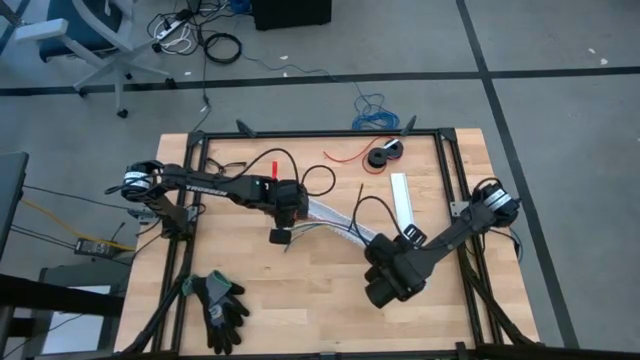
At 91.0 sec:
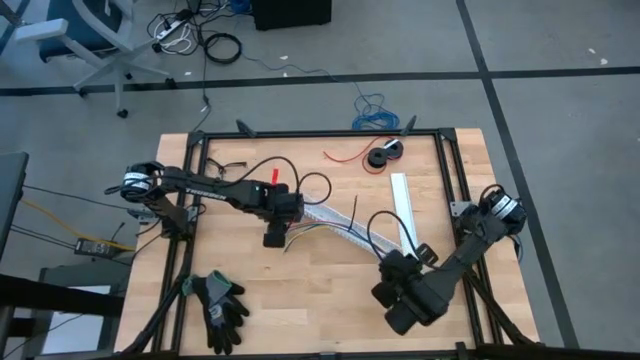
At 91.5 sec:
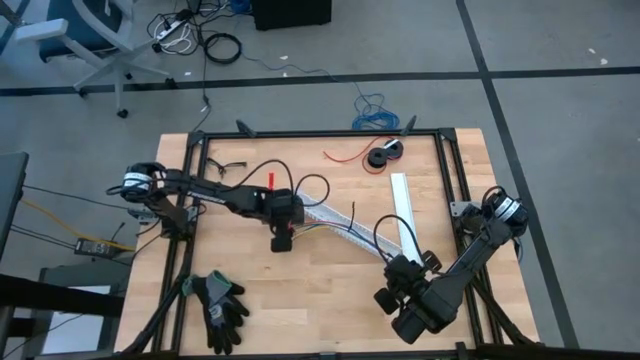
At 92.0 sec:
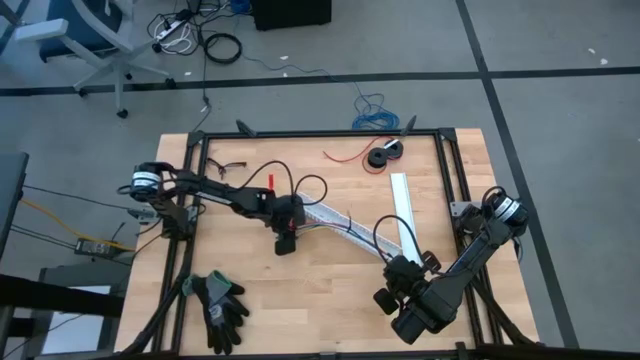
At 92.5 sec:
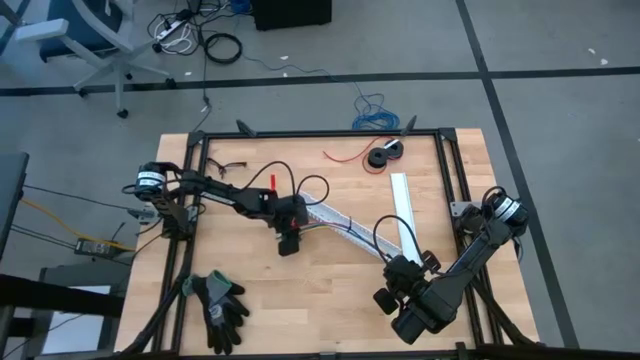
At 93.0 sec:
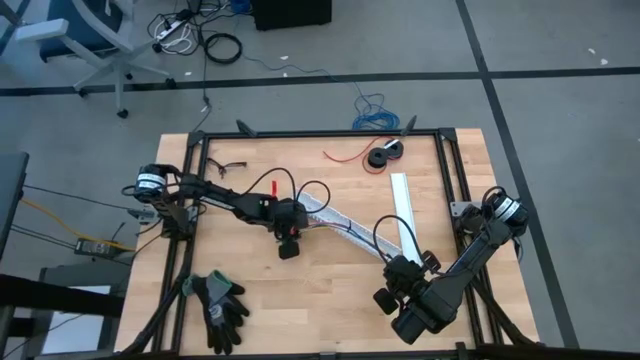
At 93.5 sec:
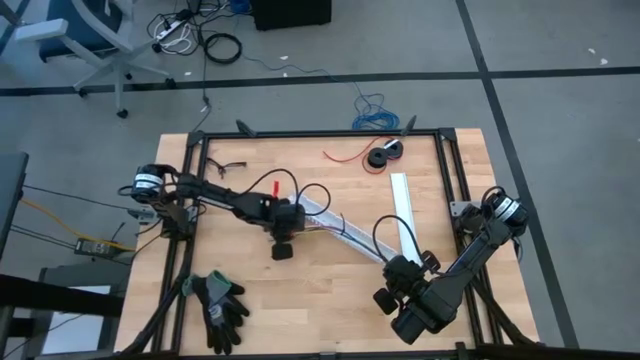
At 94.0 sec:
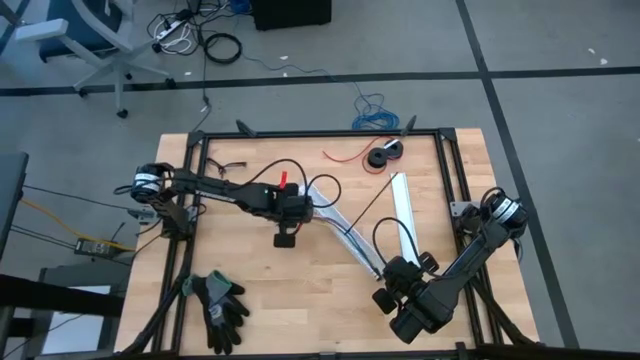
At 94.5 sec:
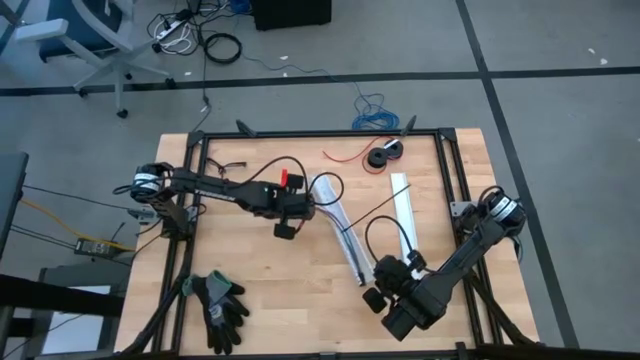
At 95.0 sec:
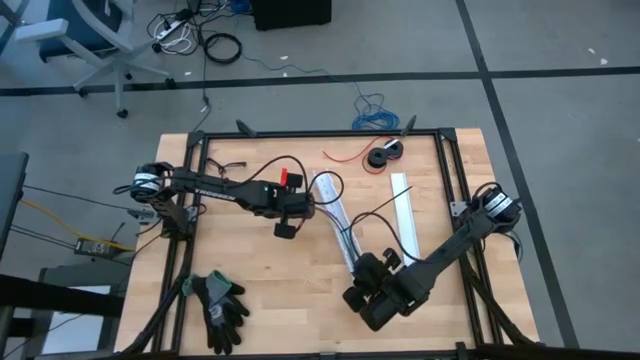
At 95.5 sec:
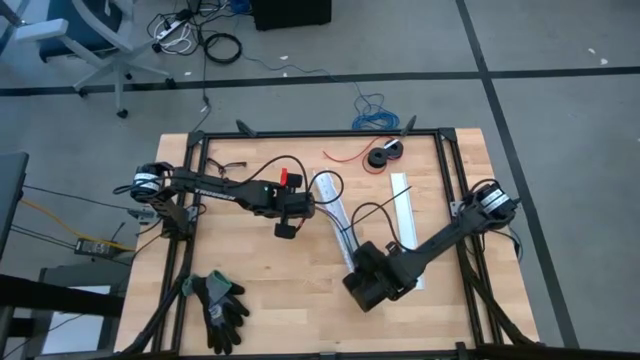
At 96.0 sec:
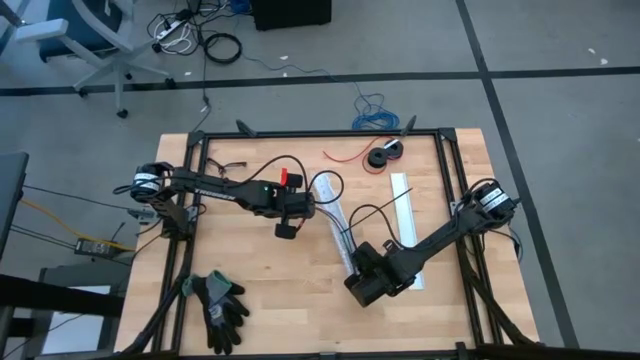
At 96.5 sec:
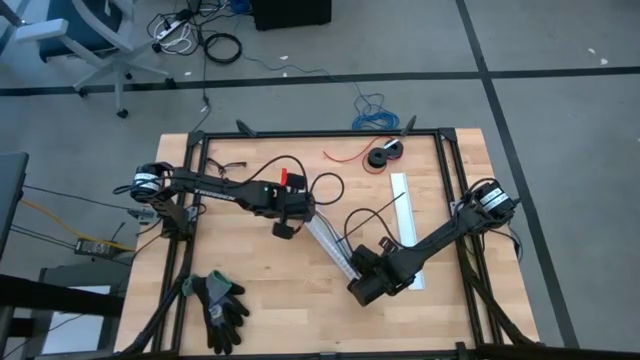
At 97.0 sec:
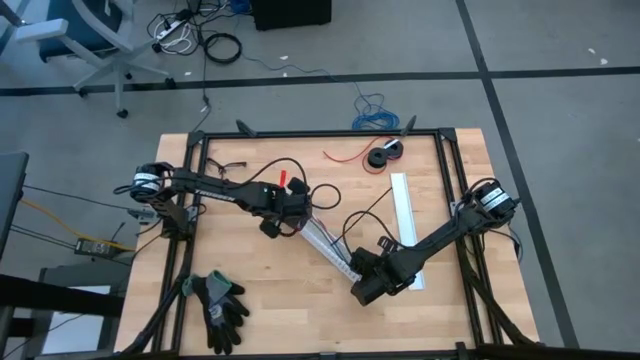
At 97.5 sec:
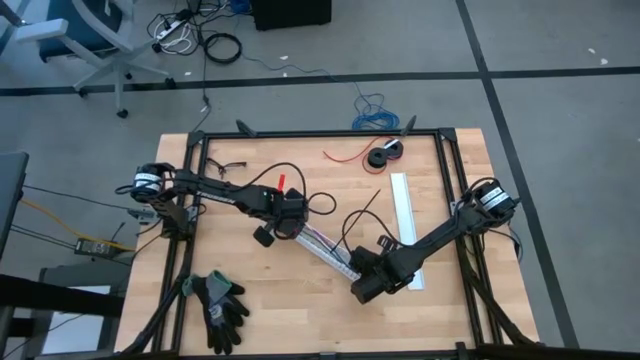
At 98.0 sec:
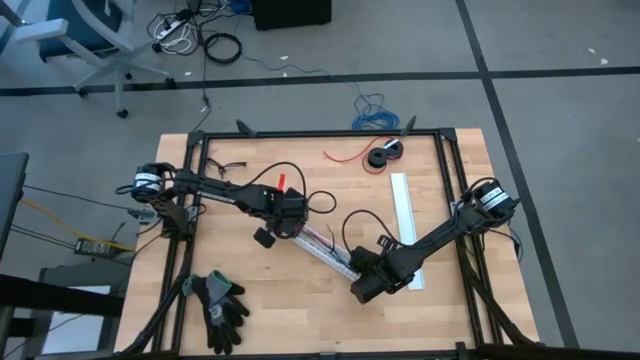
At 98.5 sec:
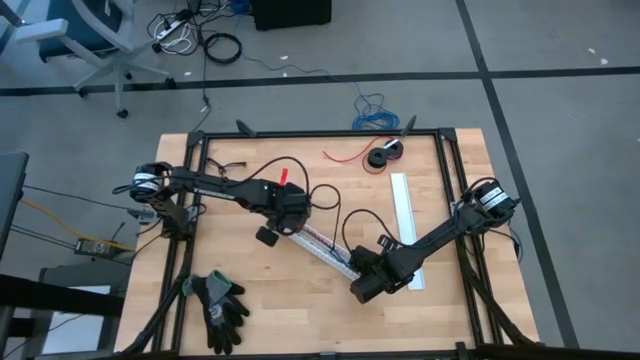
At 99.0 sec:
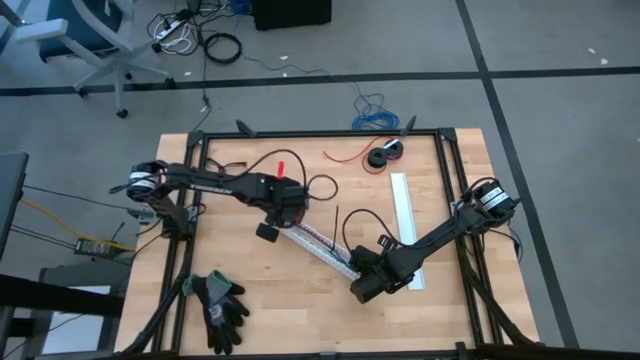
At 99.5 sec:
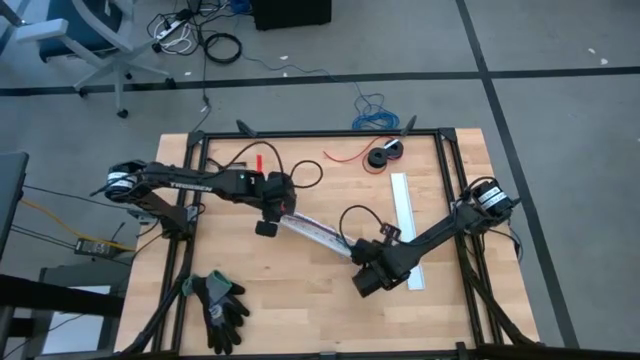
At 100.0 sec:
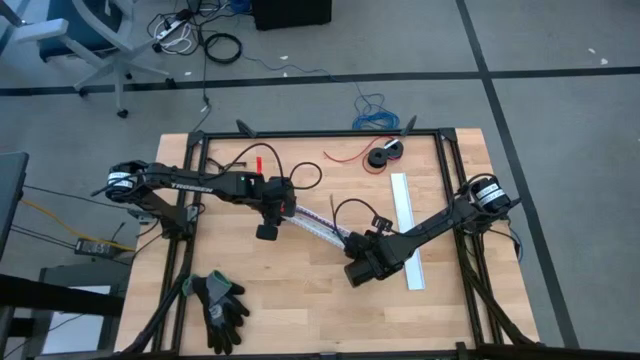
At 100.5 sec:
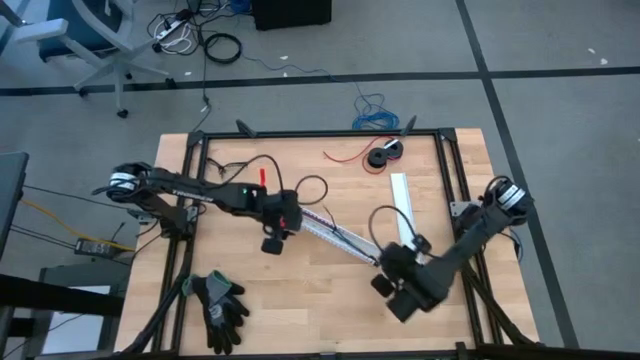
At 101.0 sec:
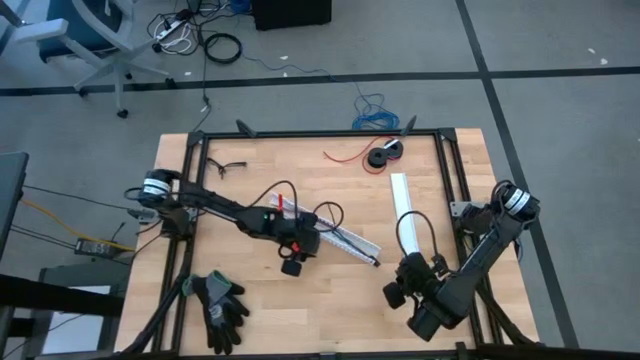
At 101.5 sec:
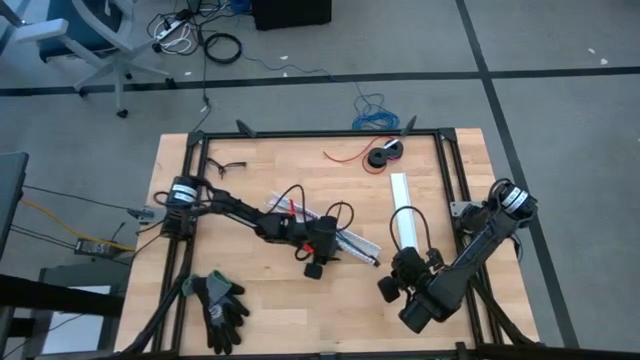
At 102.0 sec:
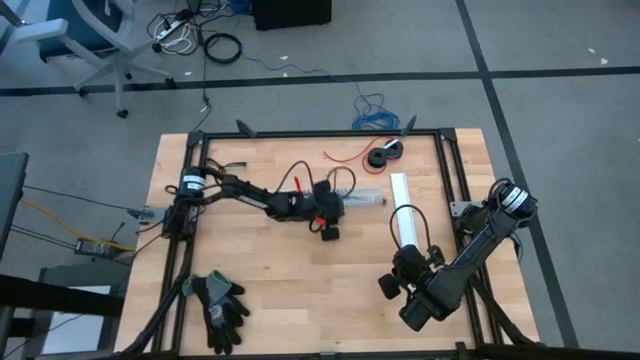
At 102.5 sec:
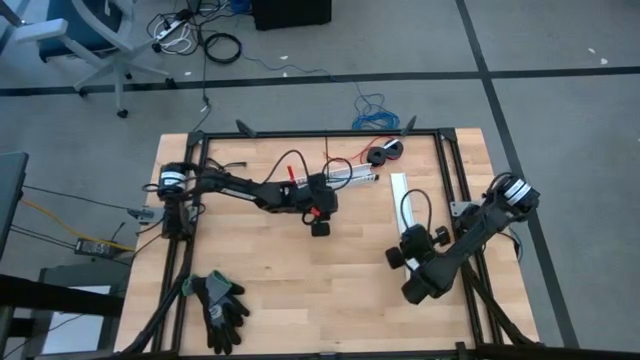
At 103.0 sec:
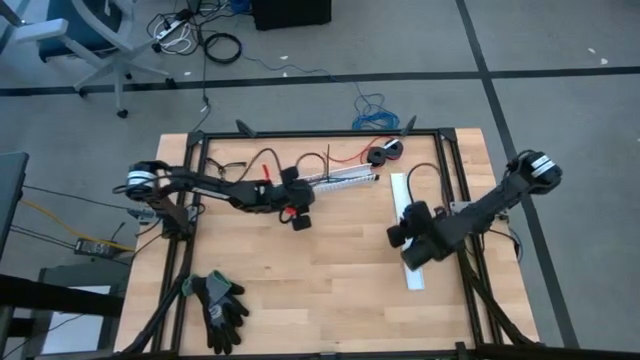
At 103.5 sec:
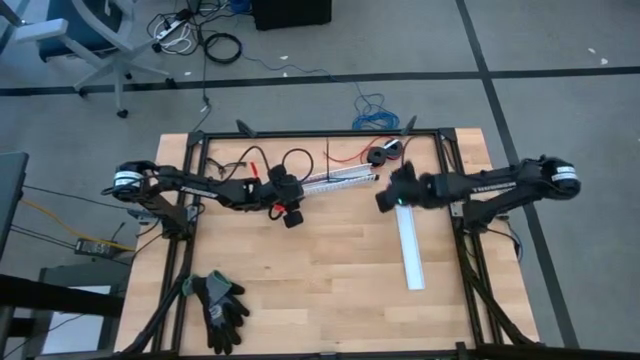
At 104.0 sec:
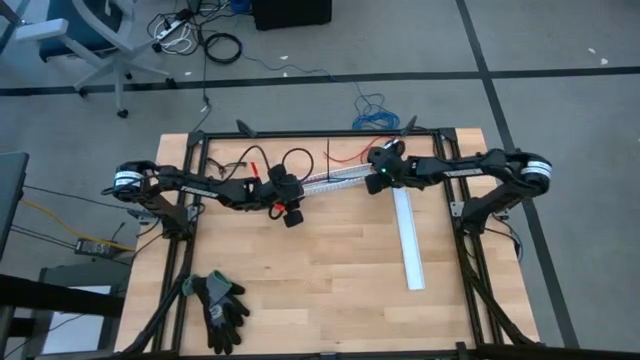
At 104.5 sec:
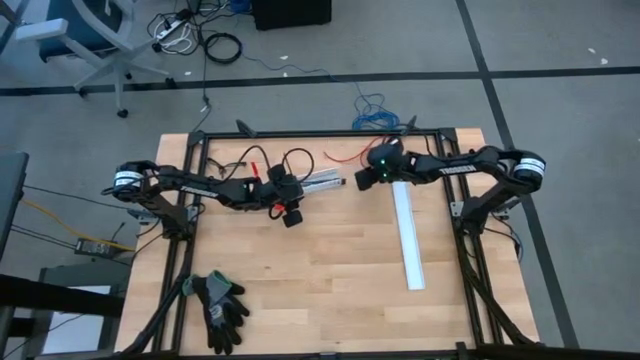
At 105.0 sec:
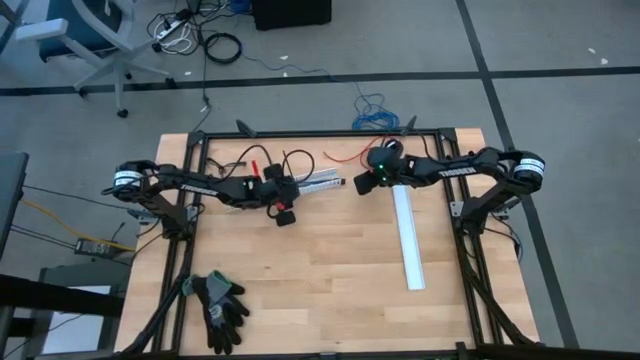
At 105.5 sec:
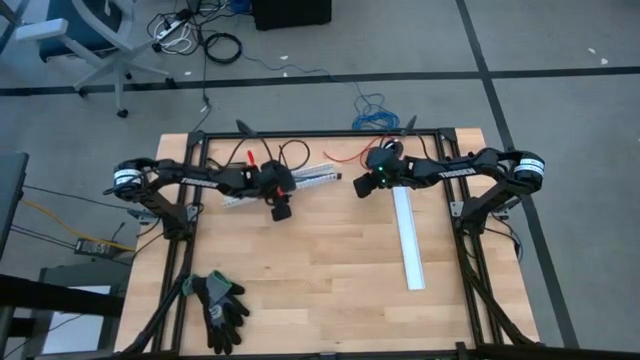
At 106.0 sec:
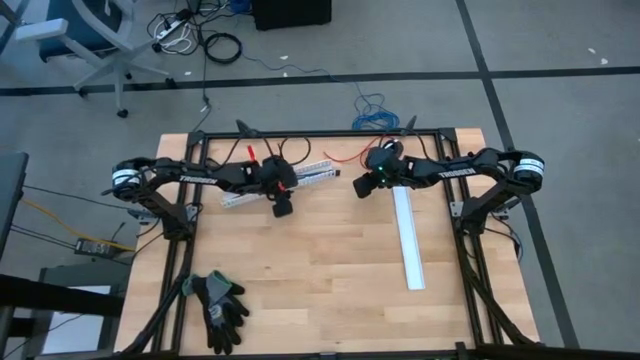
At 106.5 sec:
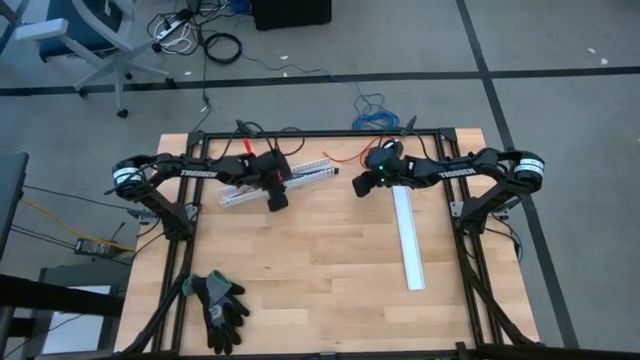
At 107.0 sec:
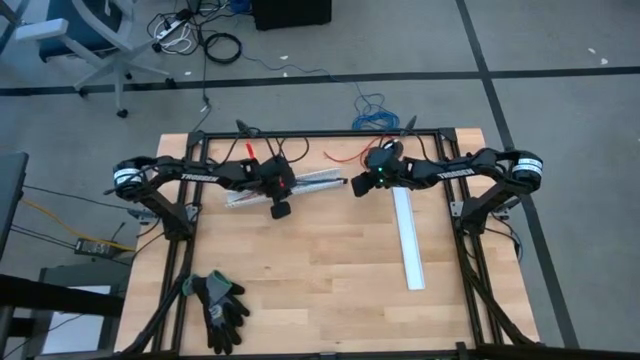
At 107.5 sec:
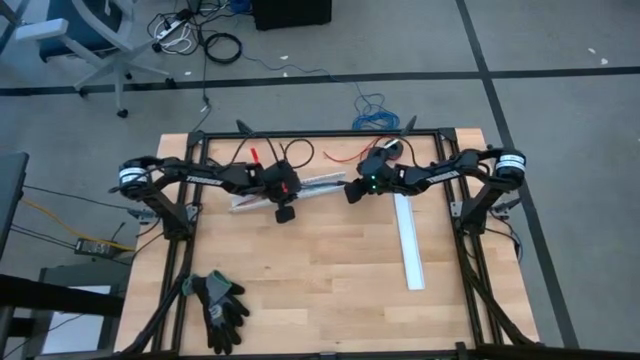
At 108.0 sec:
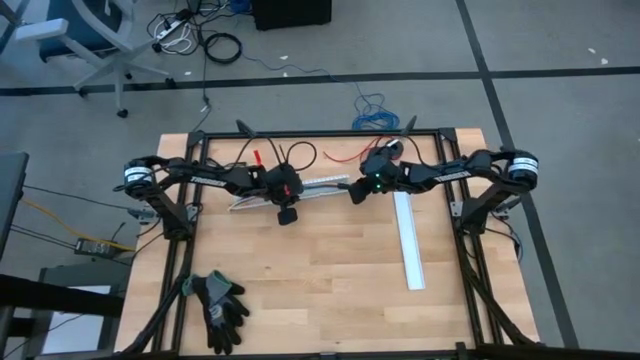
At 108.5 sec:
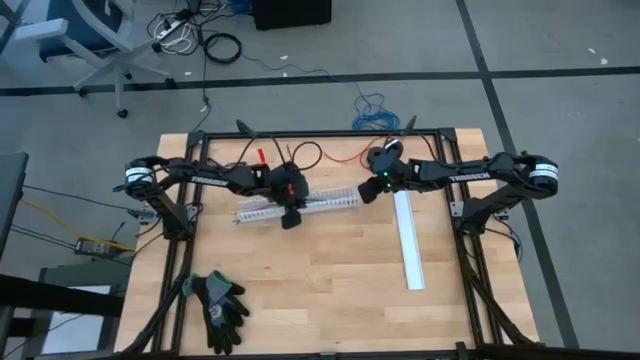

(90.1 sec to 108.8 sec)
Task: Ziptie cables
Put the zip tied cable wires into the white cable duct
